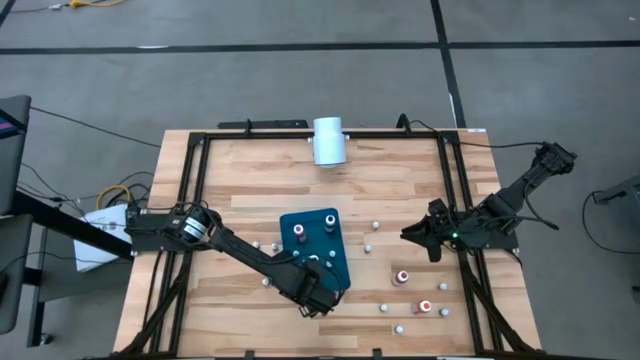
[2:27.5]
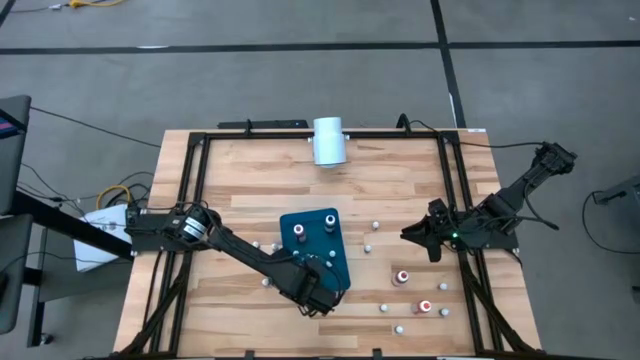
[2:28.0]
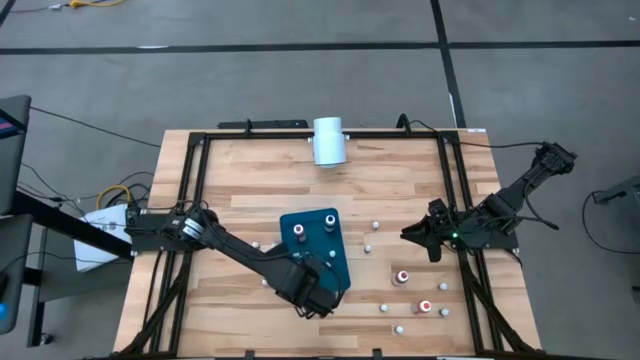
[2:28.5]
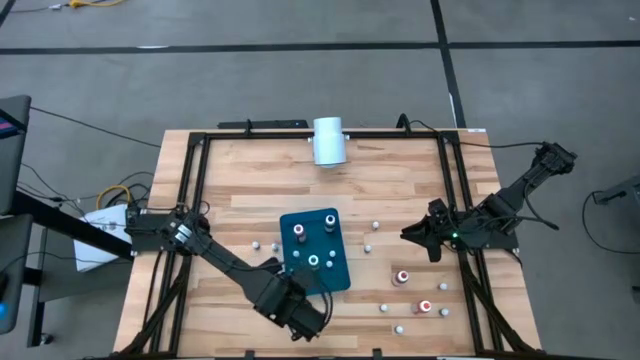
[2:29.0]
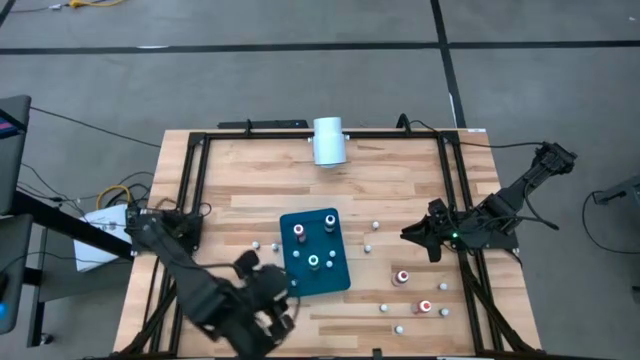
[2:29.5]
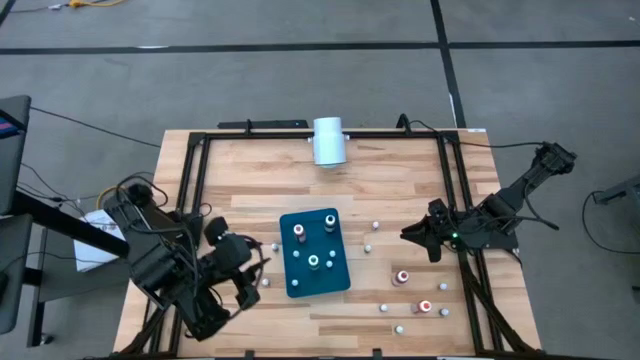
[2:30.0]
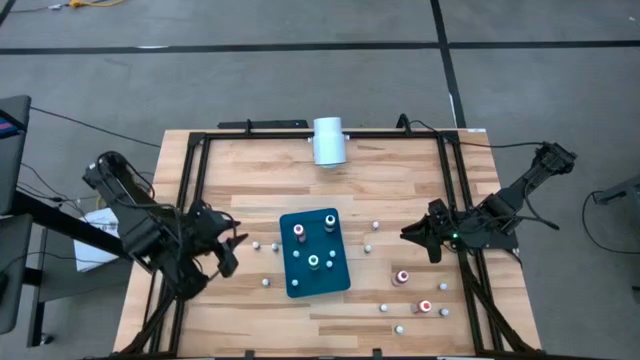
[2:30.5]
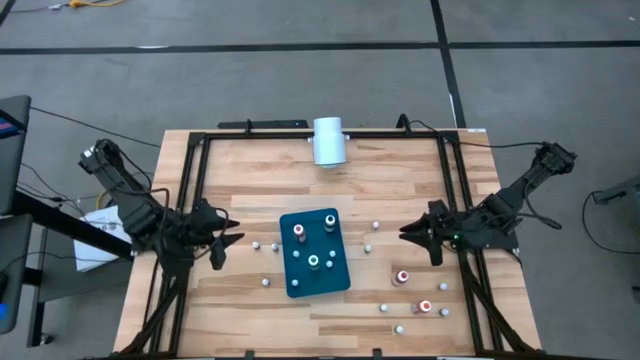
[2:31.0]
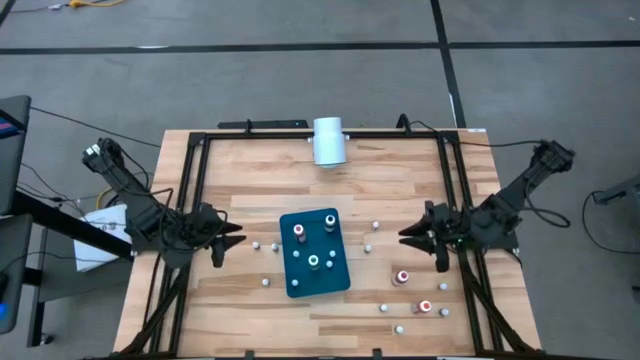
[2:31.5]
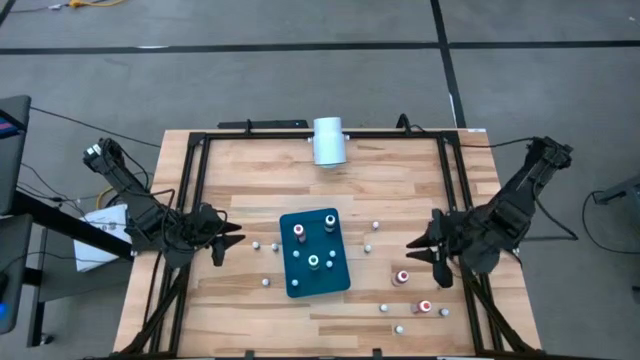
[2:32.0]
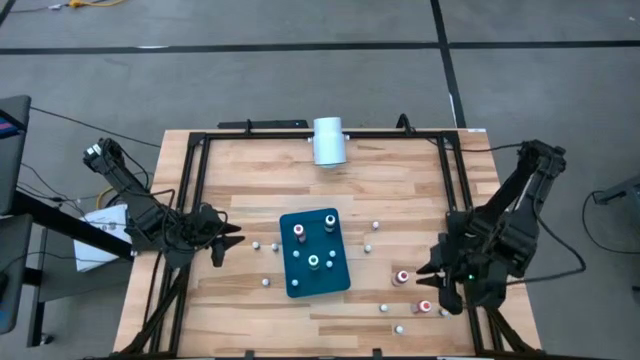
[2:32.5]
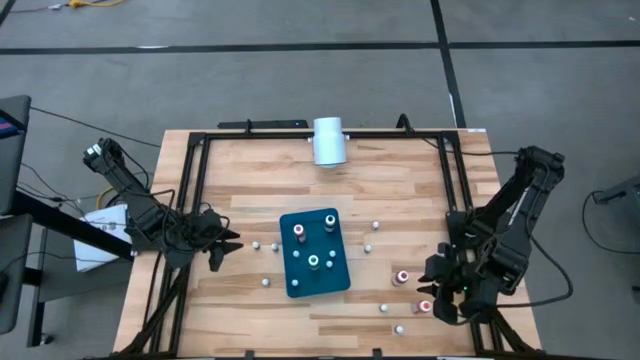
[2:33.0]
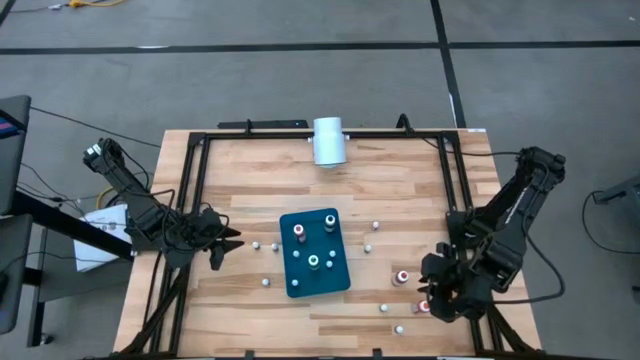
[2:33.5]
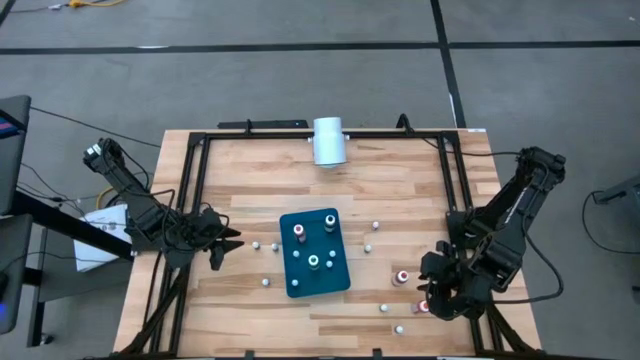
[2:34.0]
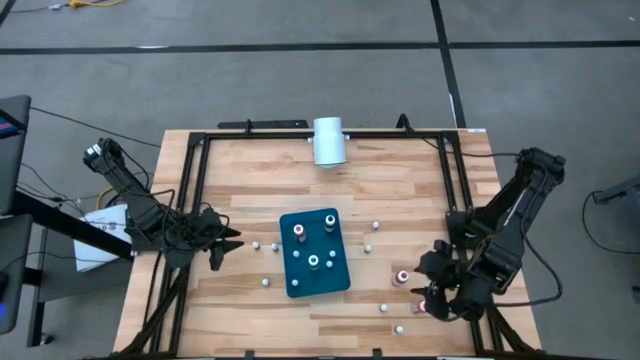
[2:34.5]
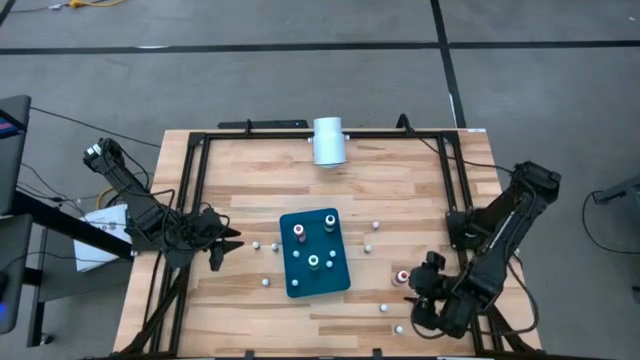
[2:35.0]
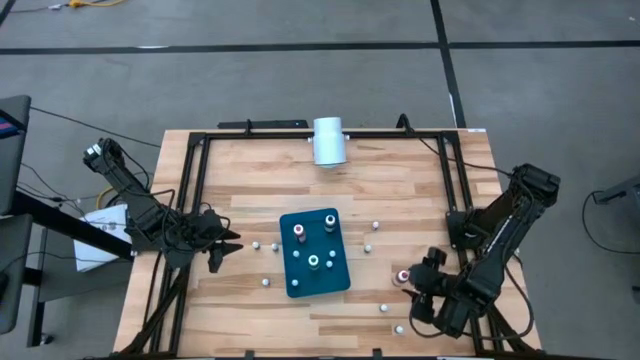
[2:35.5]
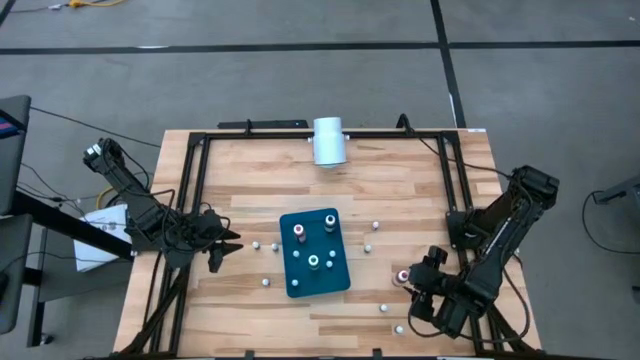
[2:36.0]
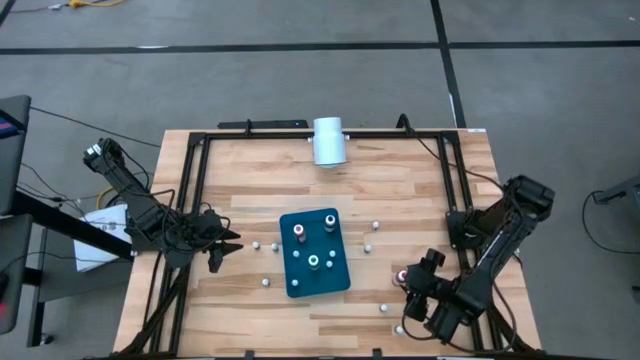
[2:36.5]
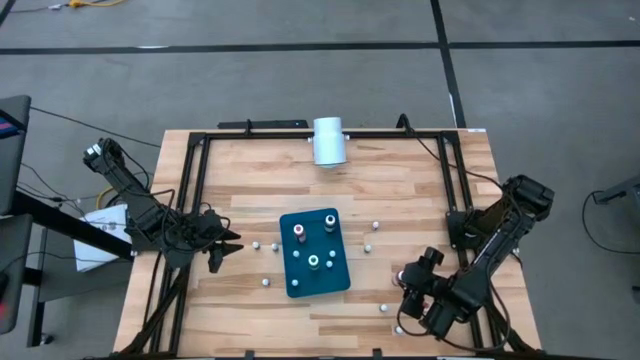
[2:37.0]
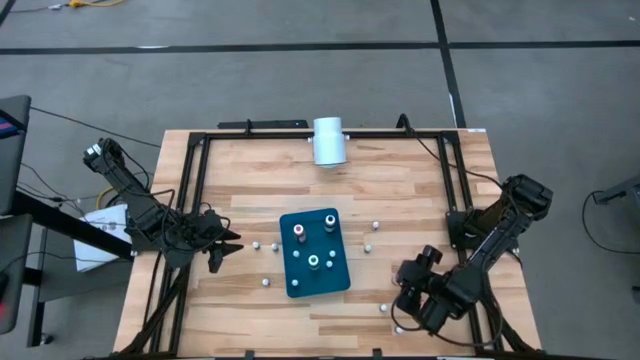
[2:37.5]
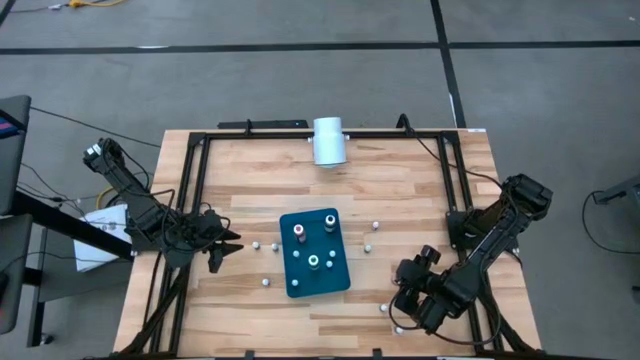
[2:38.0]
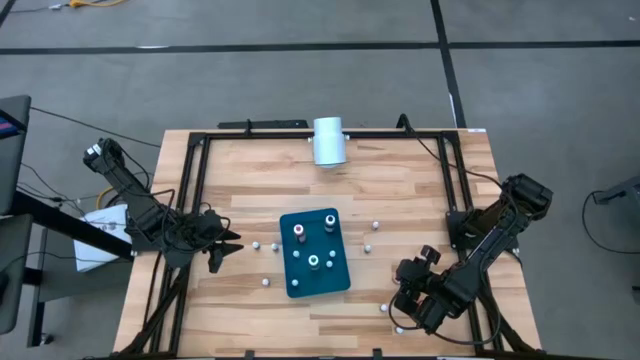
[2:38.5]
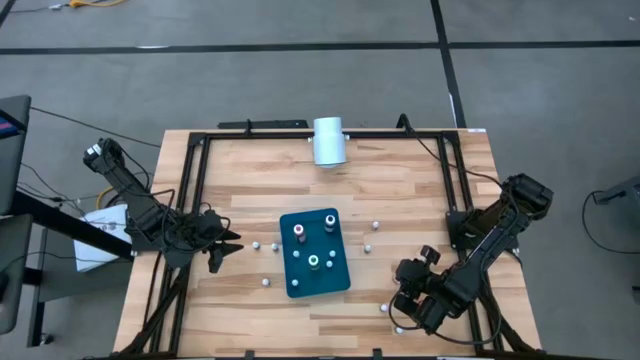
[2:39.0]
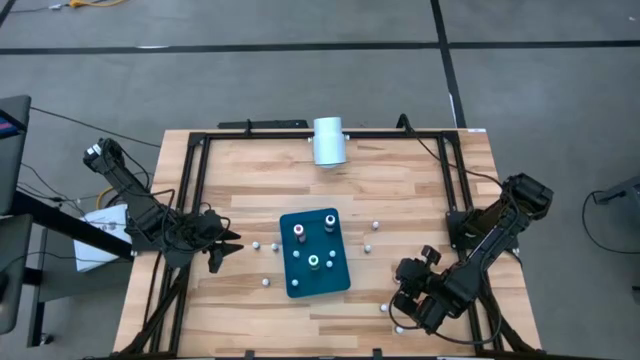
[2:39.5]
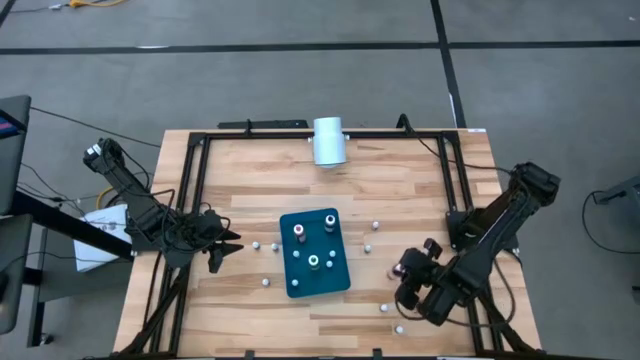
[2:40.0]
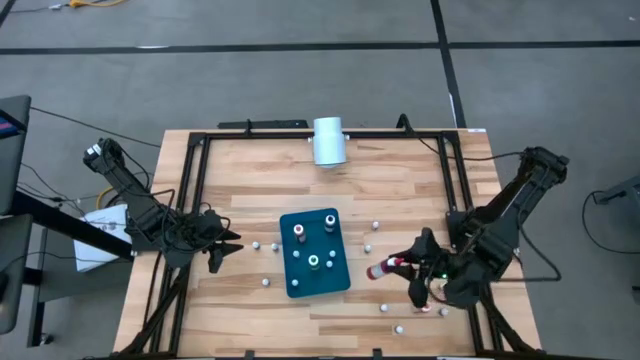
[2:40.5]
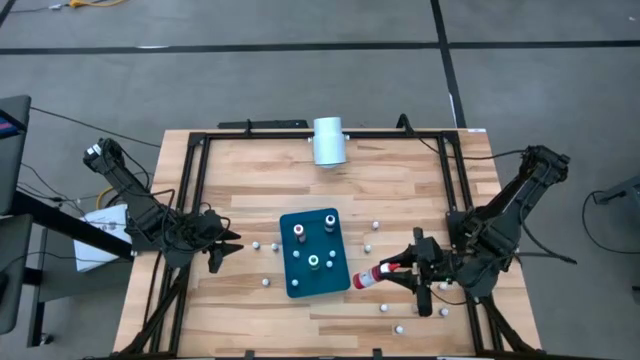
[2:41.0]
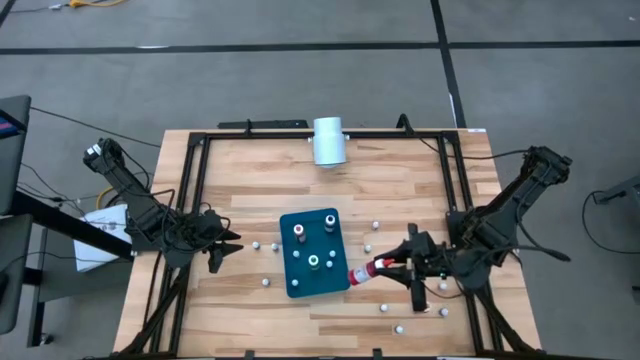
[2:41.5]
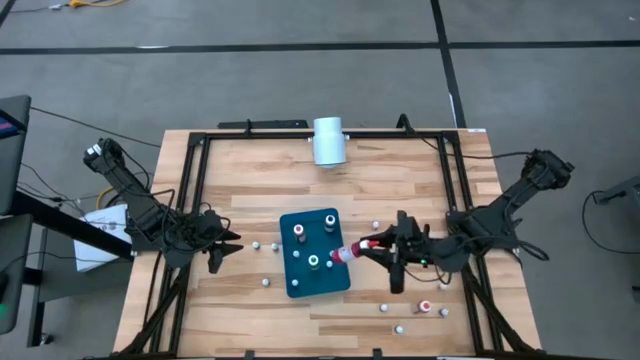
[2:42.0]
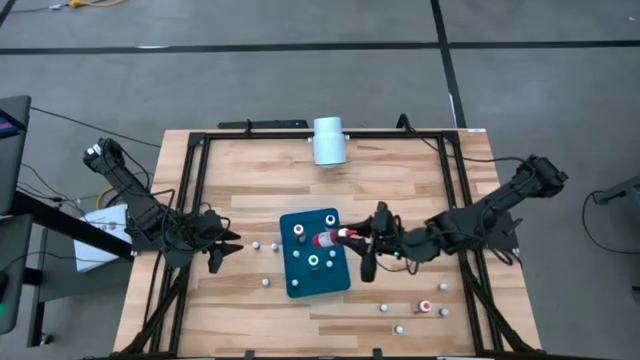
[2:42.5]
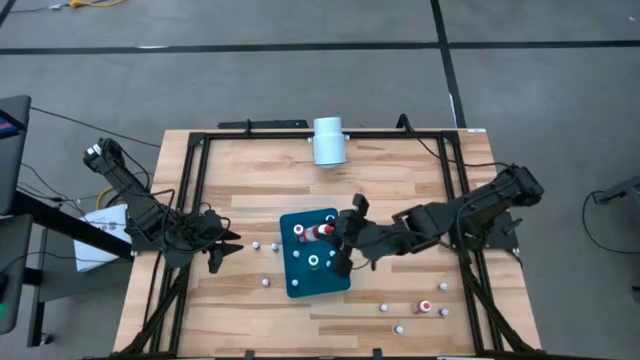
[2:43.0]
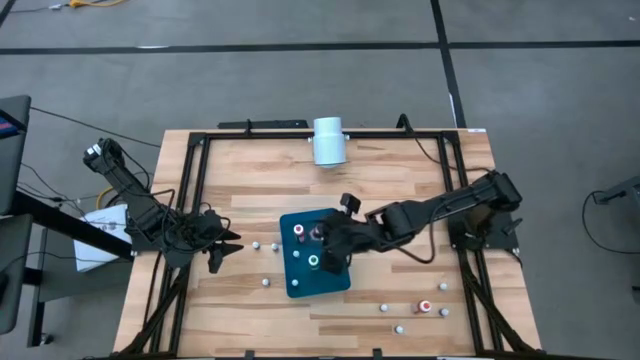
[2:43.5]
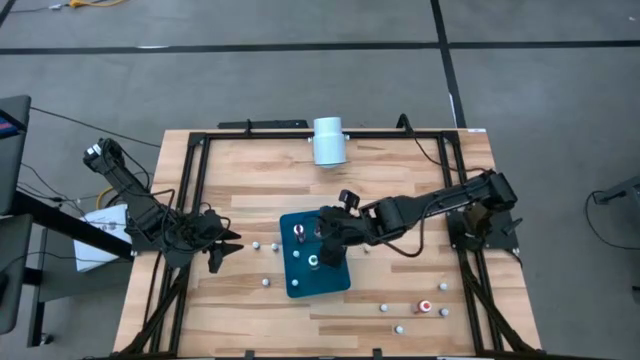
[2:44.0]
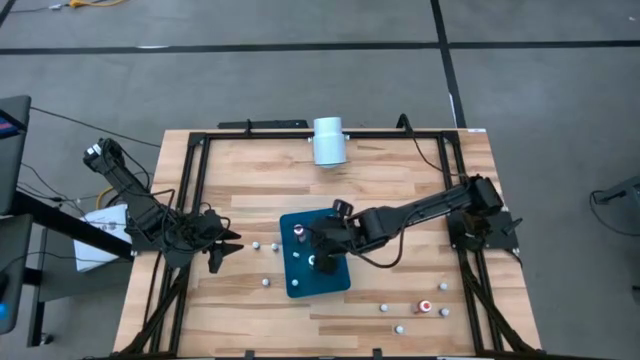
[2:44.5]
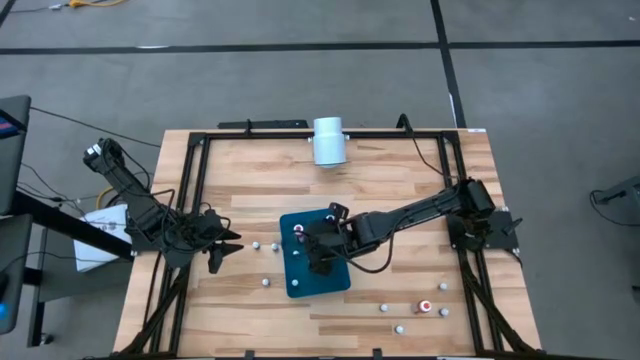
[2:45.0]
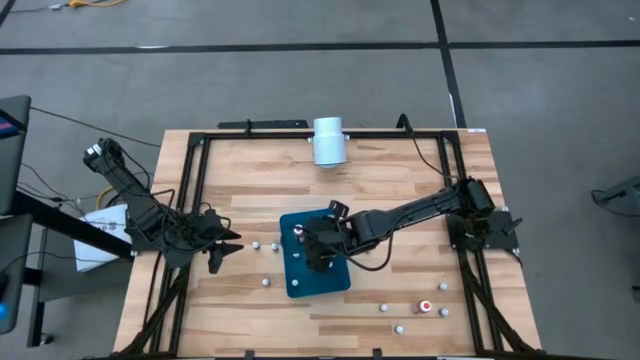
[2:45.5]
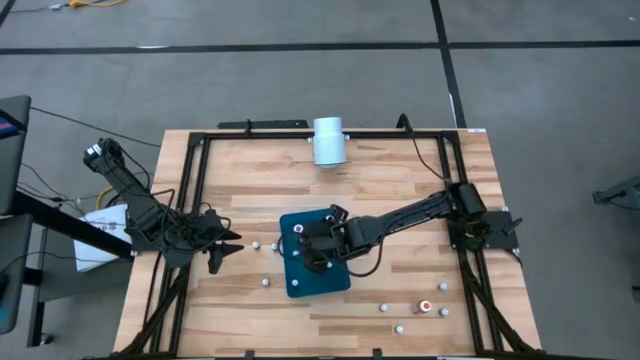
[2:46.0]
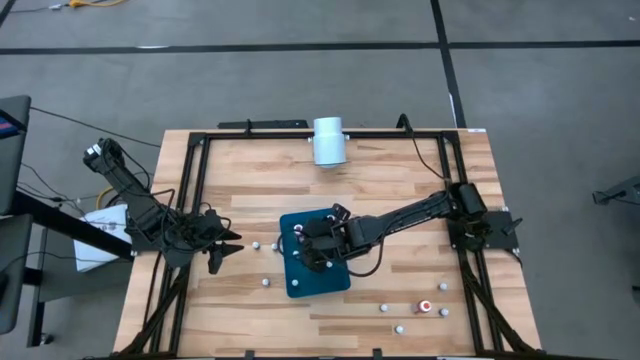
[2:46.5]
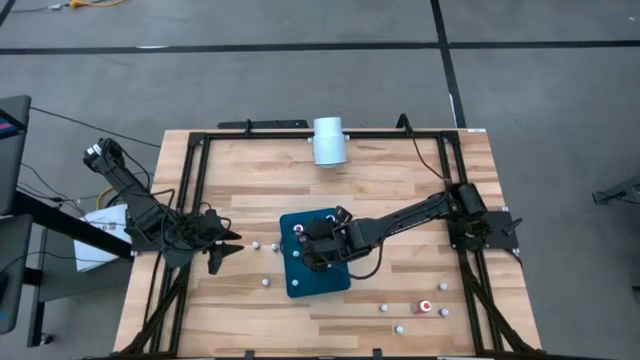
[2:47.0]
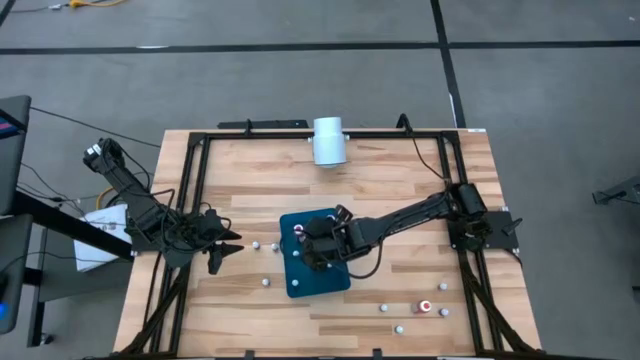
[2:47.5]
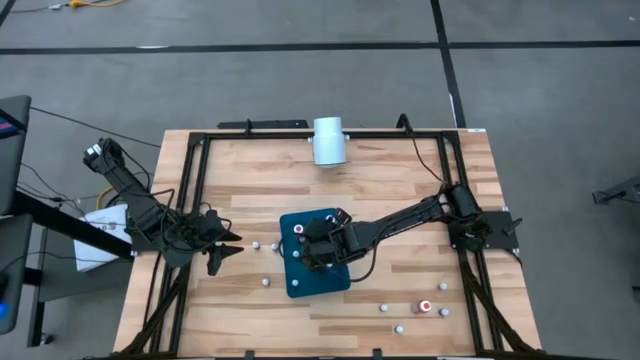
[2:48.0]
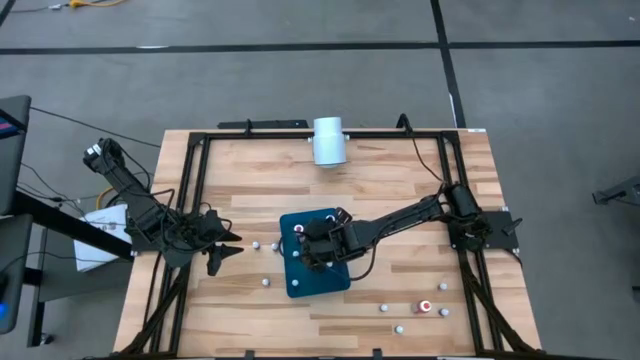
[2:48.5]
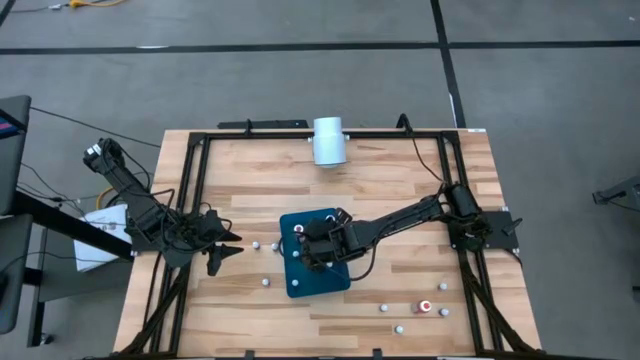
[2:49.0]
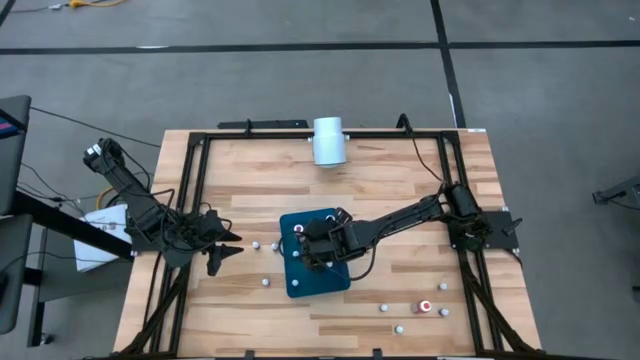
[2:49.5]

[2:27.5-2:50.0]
Task: Pick & Place food coloring
Put the big red food coloring bottle into the blue bin

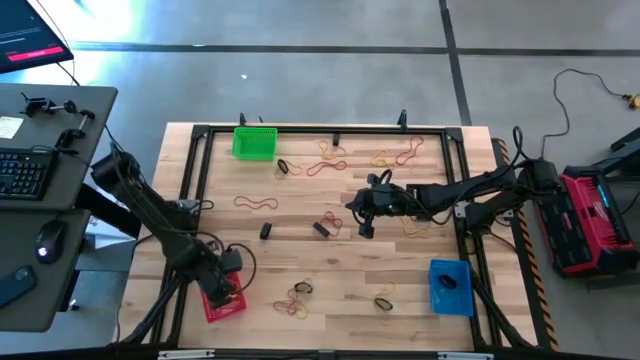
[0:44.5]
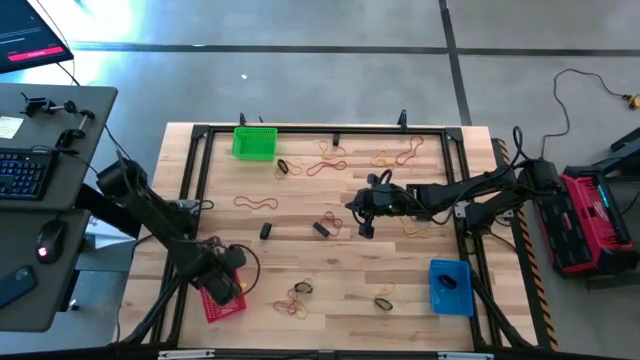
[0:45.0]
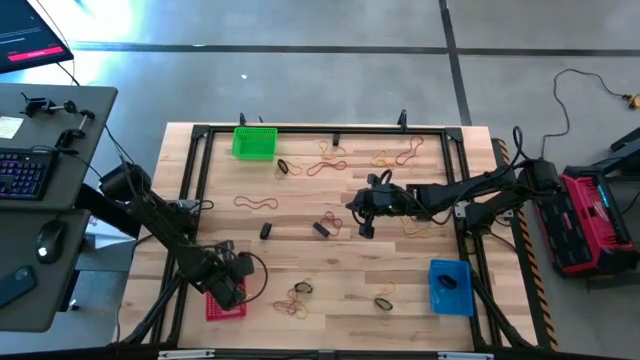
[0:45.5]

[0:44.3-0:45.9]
Task: Sort rubber bands into baskets
Adjust the red bin
